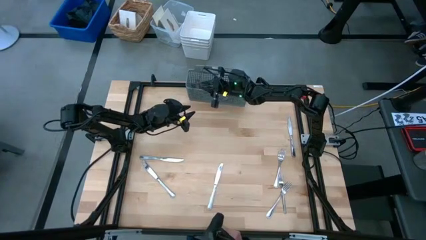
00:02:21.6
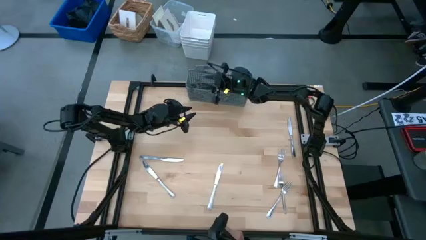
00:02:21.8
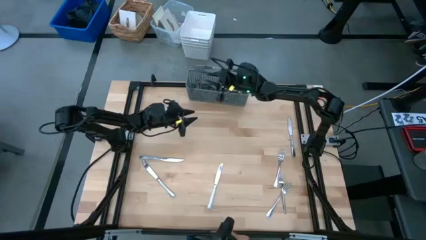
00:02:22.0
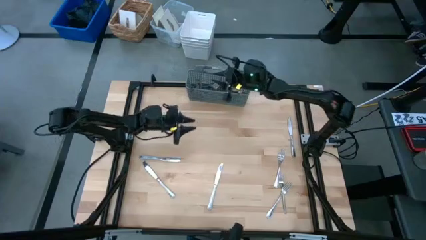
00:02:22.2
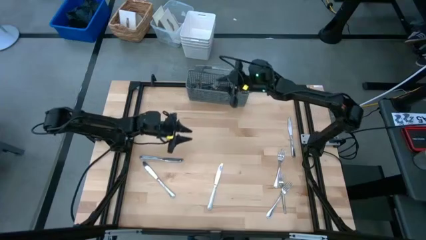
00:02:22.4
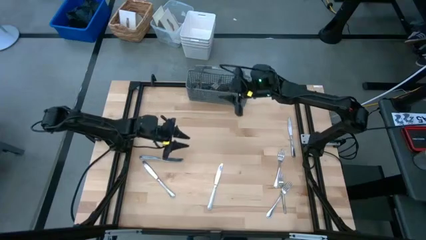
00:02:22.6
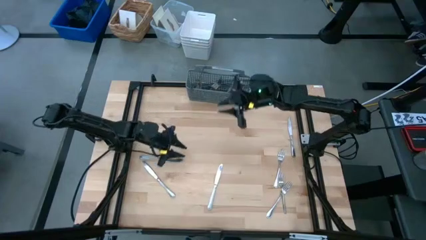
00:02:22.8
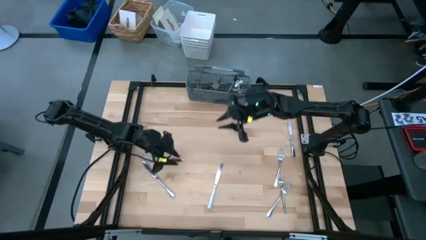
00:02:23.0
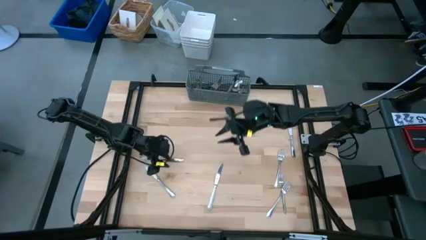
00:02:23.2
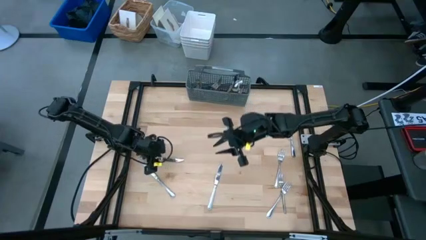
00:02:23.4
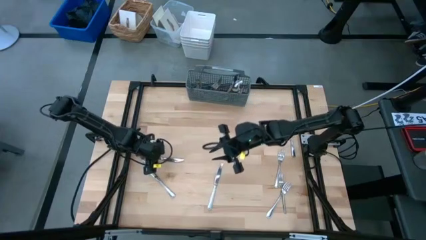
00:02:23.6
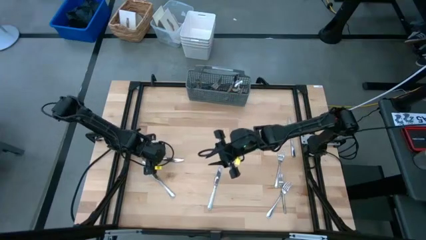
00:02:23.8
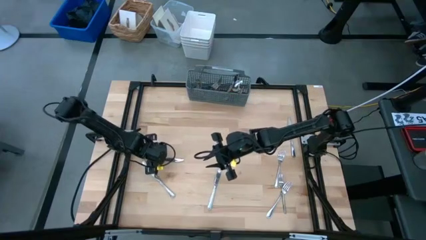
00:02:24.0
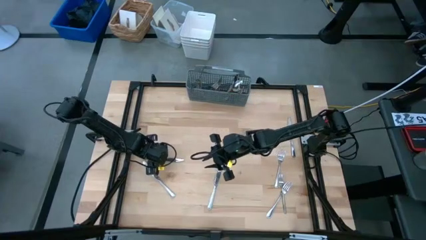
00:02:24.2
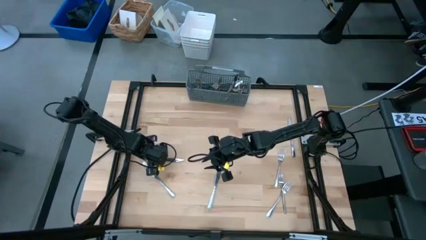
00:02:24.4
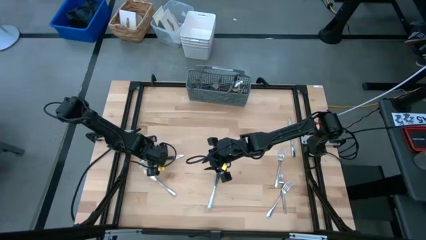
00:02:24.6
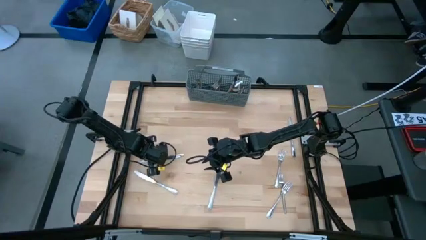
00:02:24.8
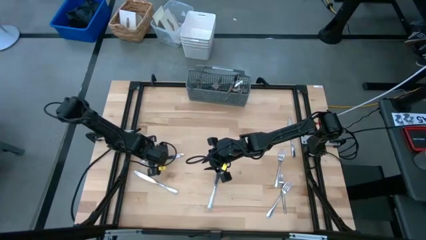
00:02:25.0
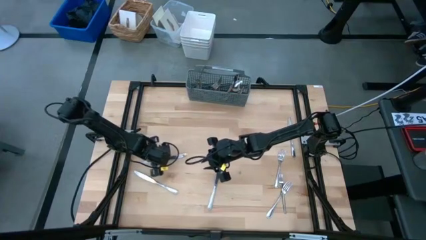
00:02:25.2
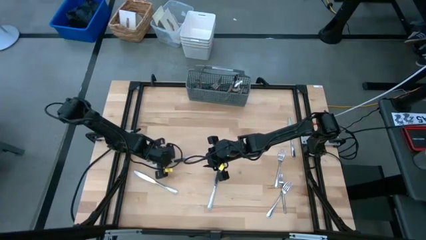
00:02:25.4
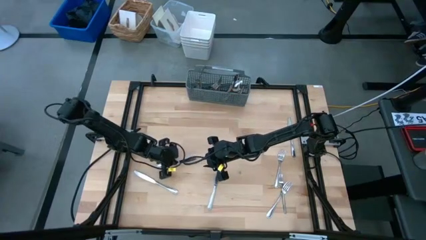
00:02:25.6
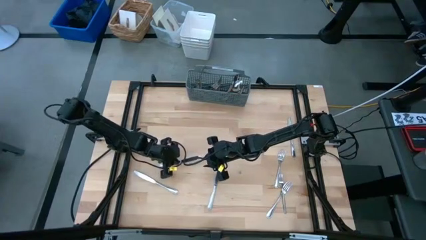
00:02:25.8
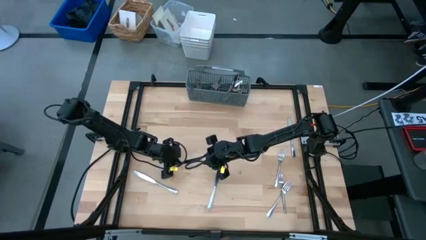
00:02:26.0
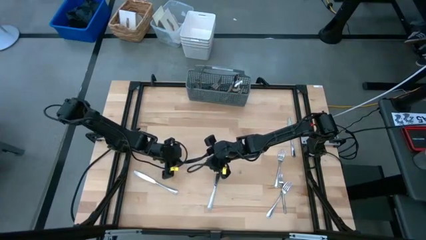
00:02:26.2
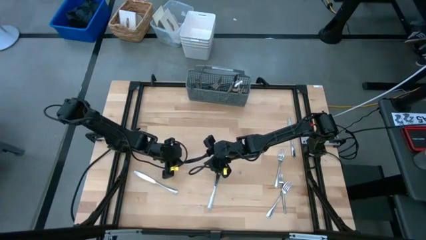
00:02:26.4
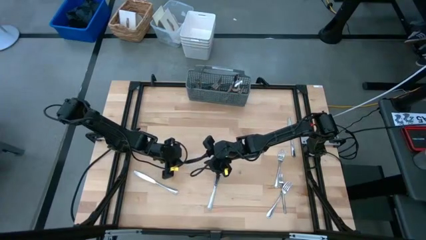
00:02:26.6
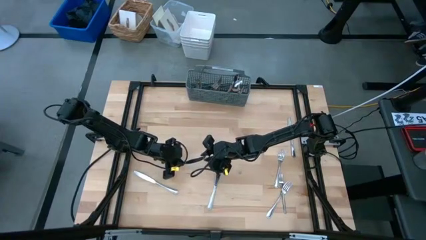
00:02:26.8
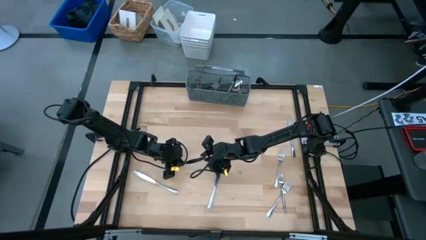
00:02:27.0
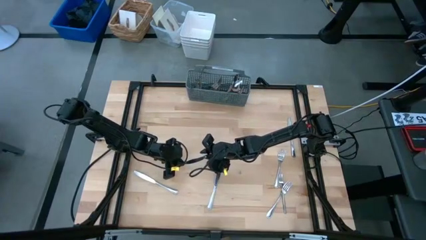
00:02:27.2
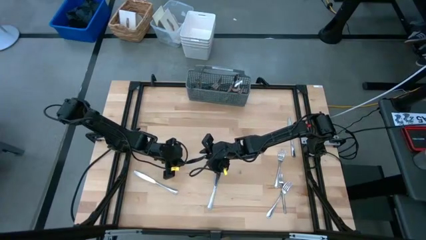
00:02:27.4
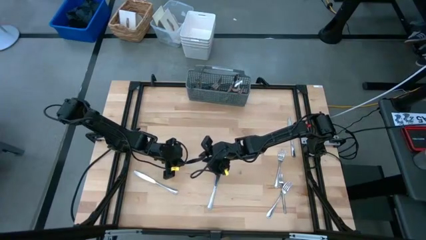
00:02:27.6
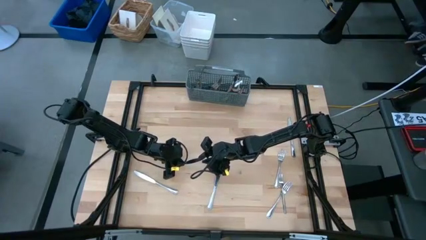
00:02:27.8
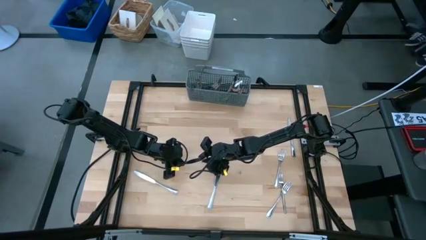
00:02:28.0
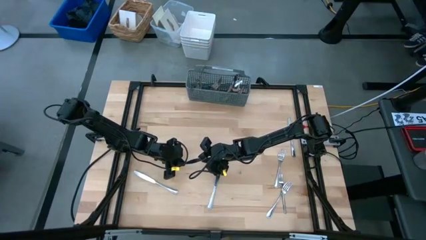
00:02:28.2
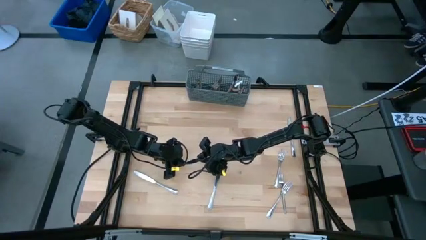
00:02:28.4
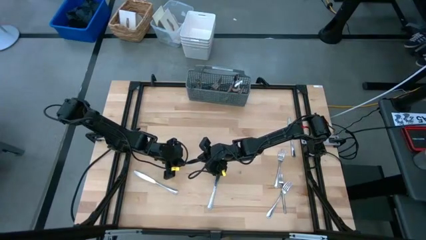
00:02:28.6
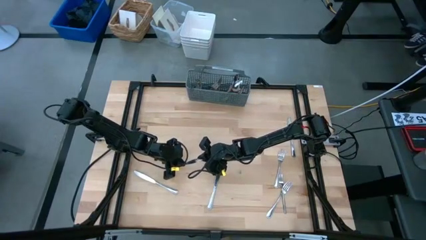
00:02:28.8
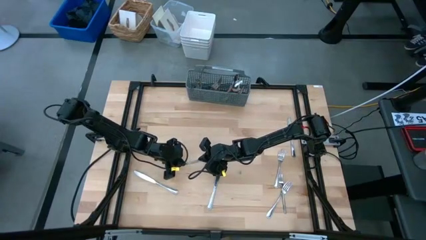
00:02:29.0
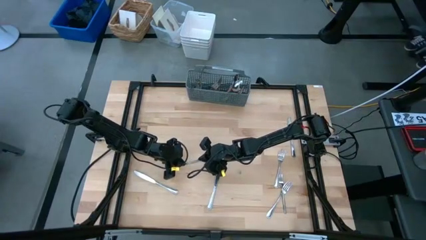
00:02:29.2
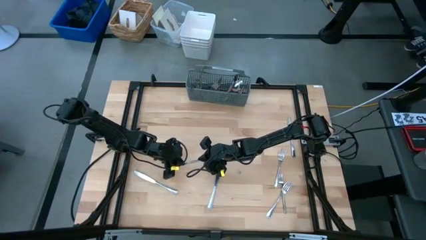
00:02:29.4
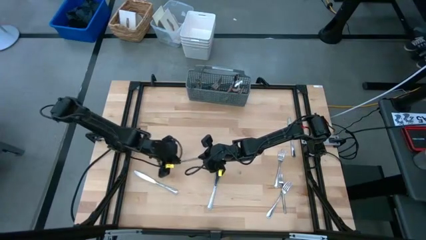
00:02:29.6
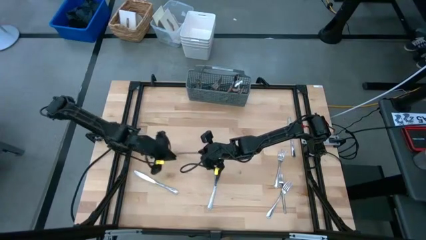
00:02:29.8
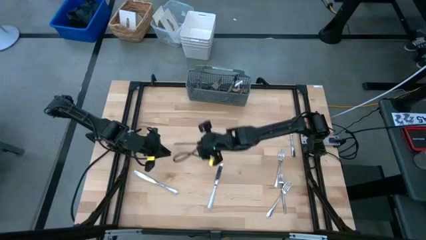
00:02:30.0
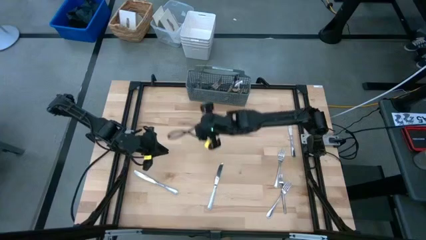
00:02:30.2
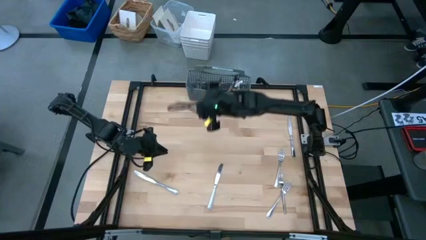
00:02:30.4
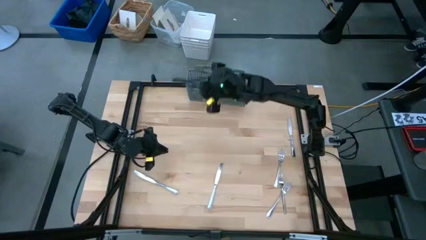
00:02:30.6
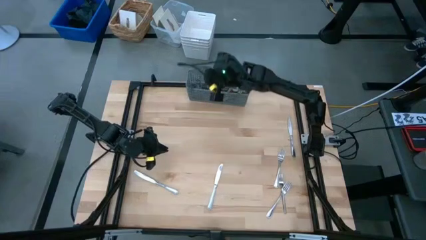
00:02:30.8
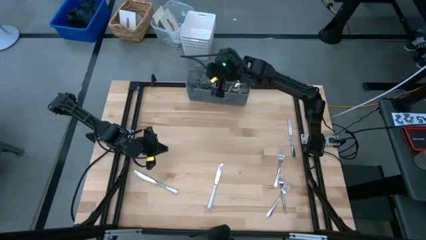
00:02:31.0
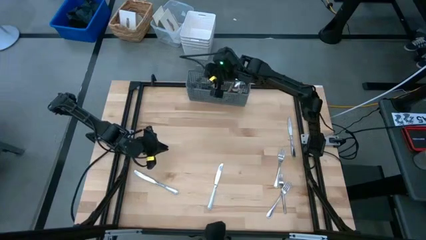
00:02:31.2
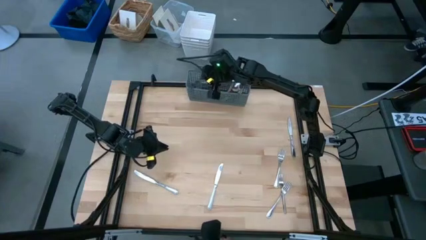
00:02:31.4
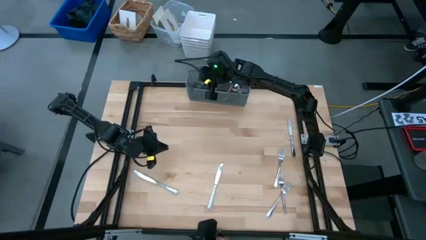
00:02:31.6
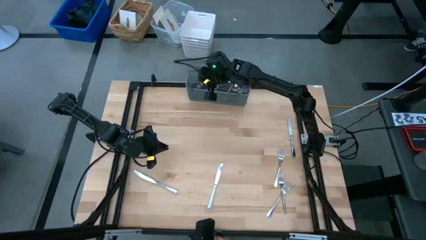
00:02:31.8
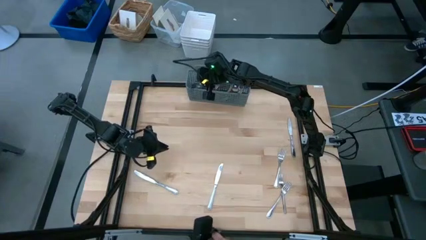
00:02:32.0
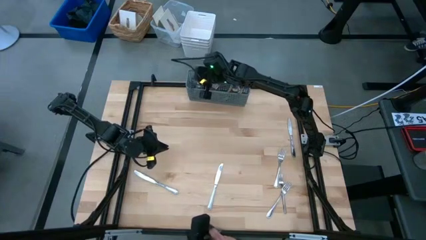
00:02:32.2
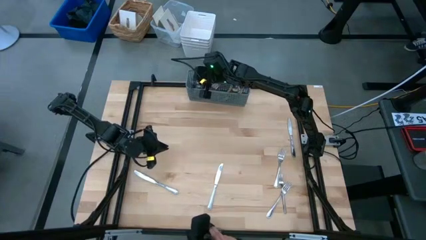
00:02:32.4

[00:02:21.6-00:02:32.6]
Task: Sort silverware
Put the table knife into the gray silverware organizer

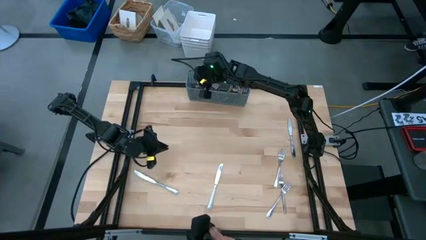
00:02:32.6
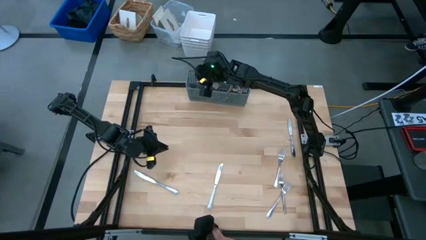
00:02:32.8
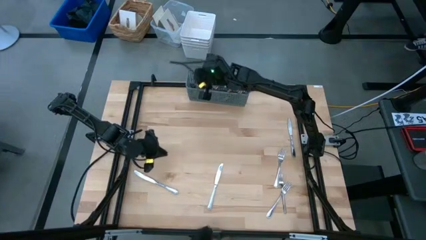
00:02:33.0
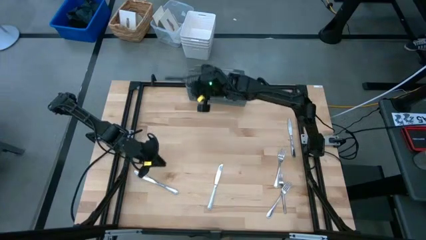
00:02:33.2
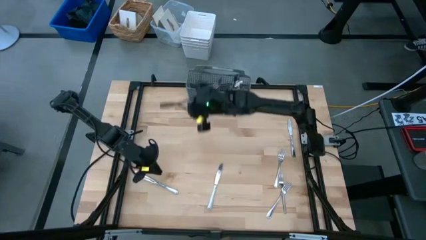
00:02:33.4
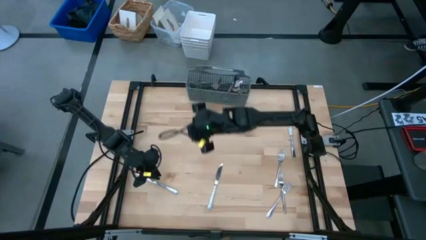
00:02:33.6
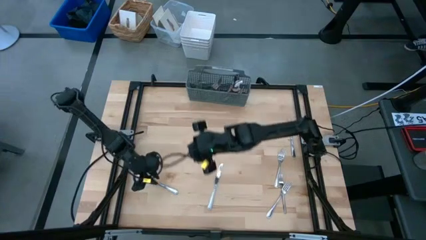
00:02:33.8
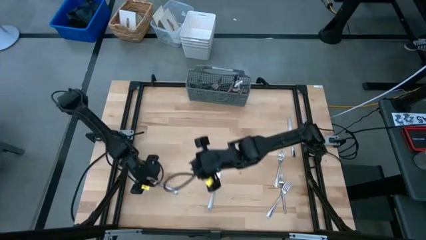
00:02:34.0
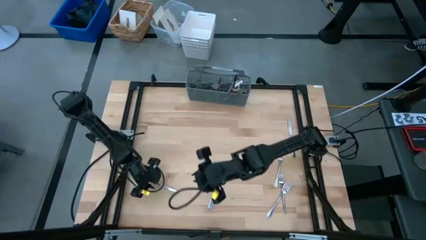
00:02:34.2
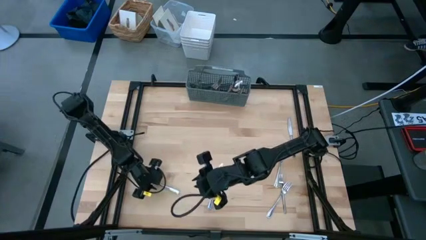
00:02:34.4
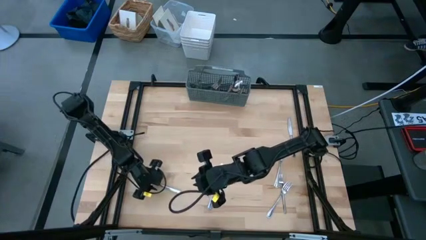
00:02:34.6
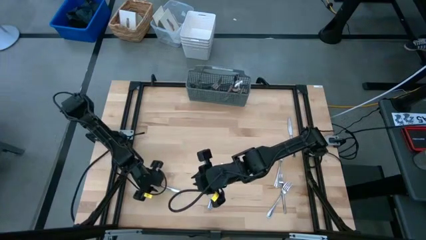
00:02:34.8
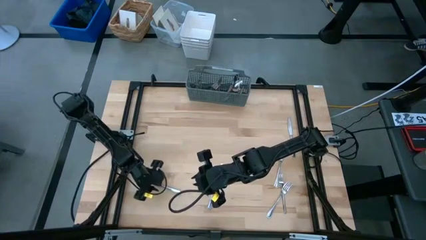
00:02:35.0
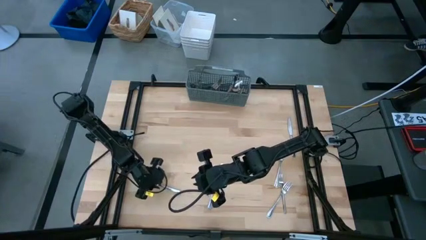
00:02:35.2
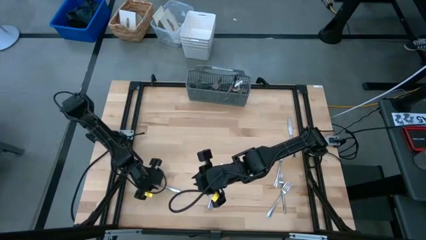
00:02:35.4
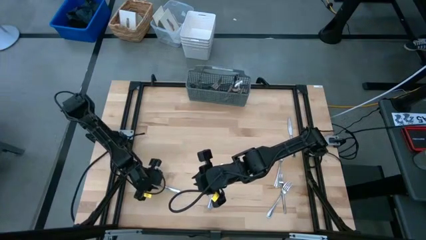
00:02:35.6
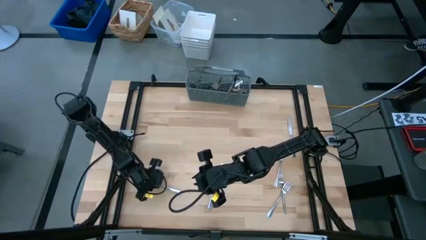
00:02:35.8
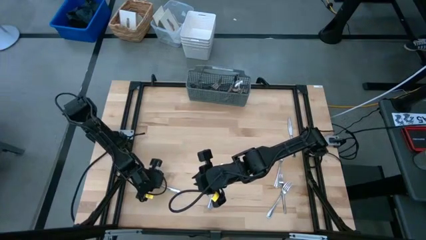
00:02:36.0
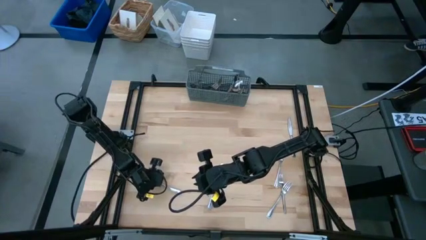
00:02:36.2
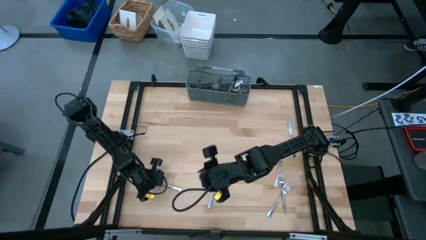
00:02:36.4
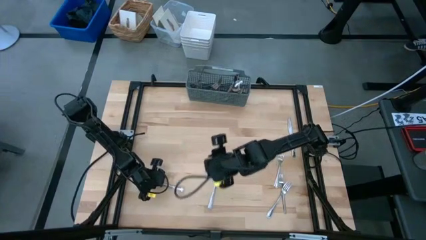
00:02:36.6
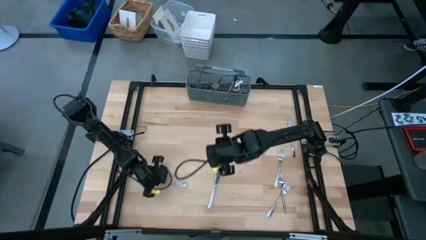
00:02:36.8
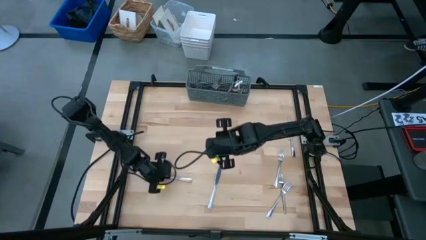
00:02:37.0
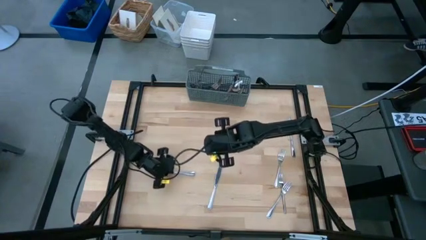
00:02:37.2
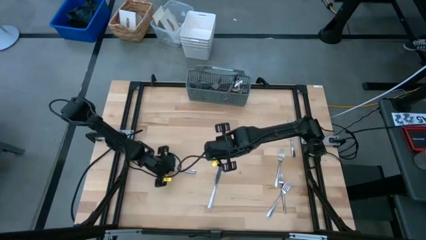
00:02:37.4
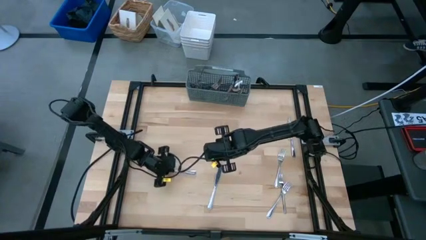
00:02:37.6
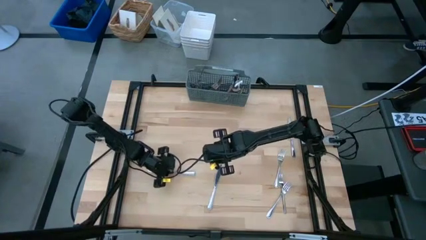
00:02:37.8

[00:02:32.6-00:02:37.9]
Put the table knife into the gray silverware organizer
